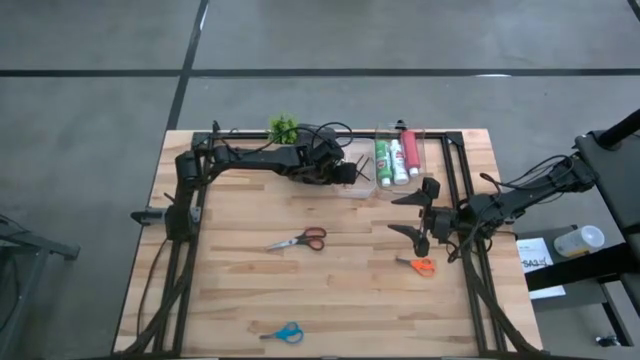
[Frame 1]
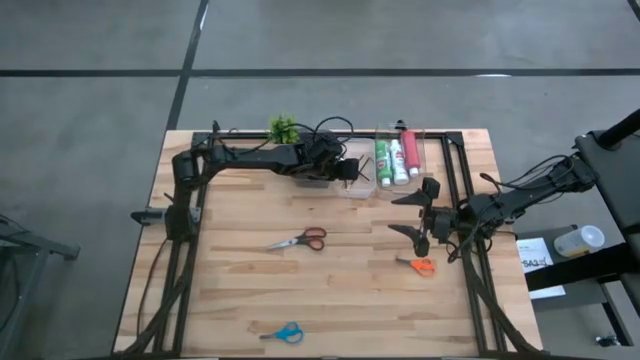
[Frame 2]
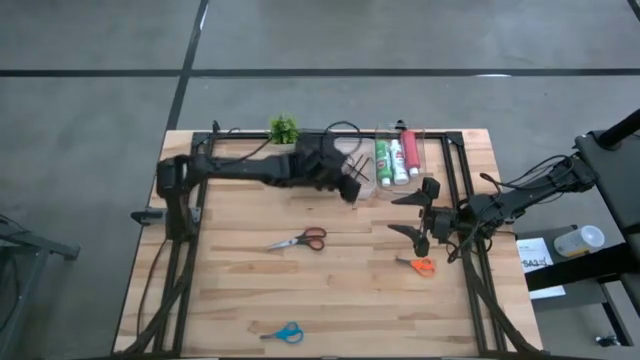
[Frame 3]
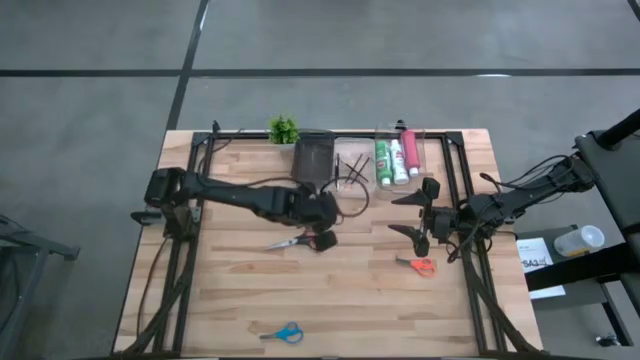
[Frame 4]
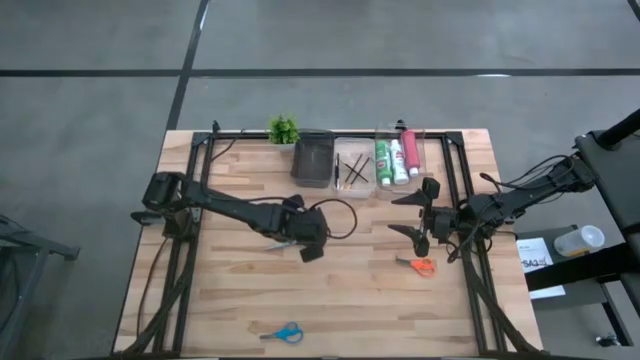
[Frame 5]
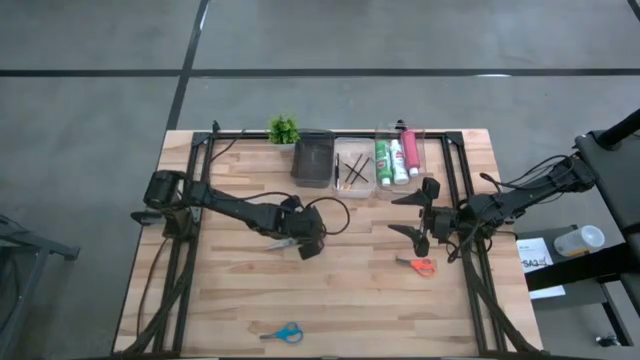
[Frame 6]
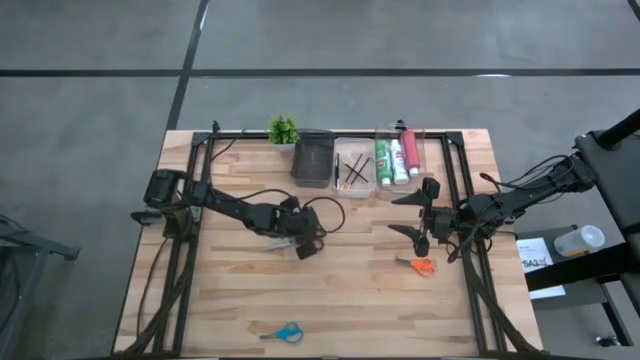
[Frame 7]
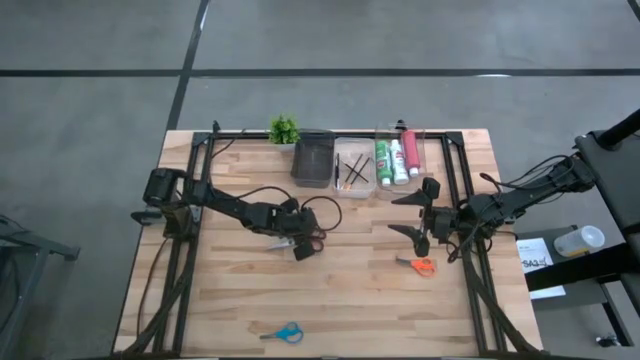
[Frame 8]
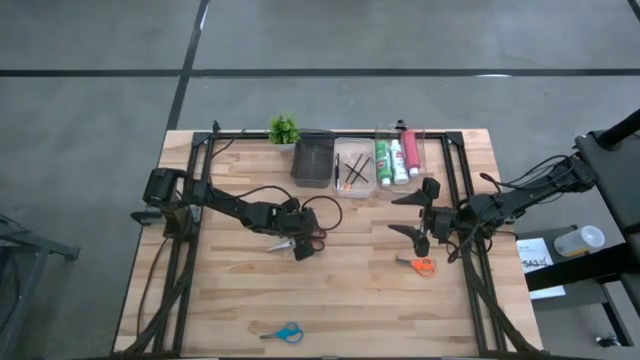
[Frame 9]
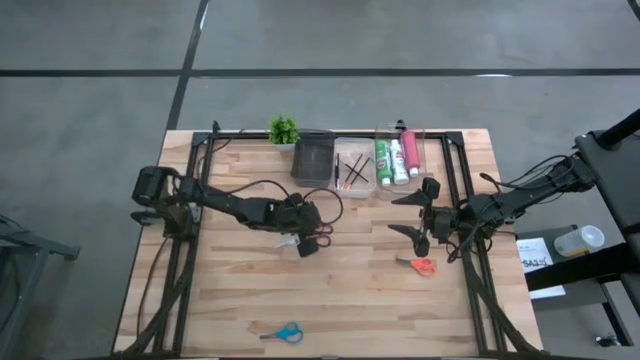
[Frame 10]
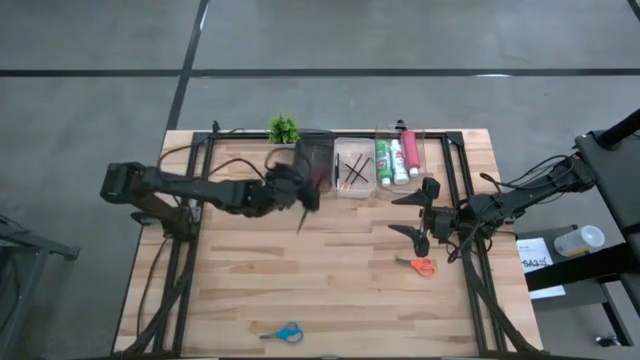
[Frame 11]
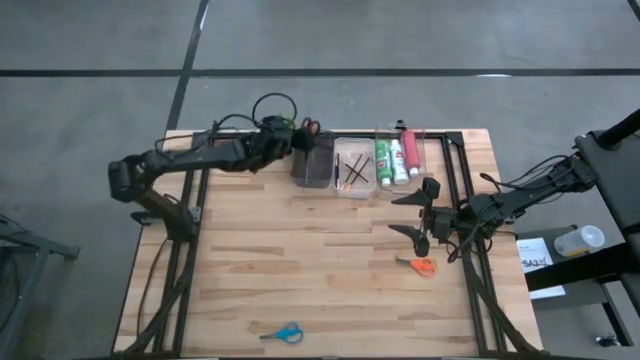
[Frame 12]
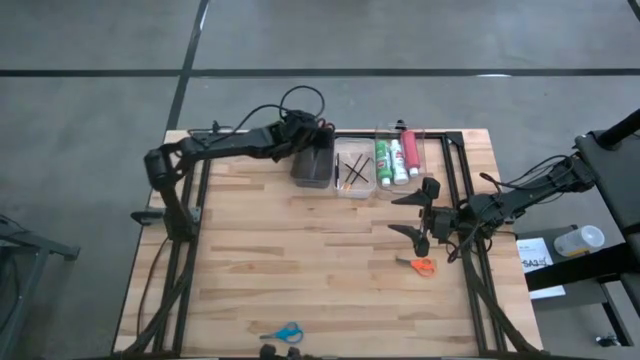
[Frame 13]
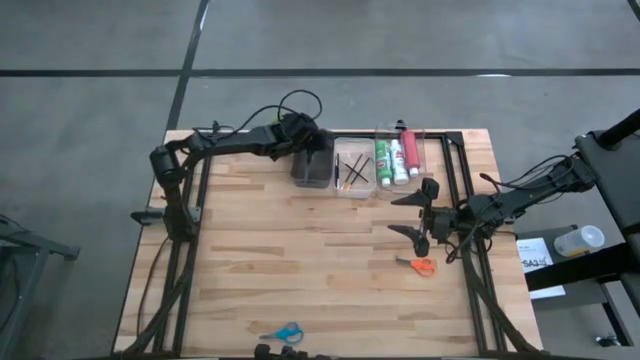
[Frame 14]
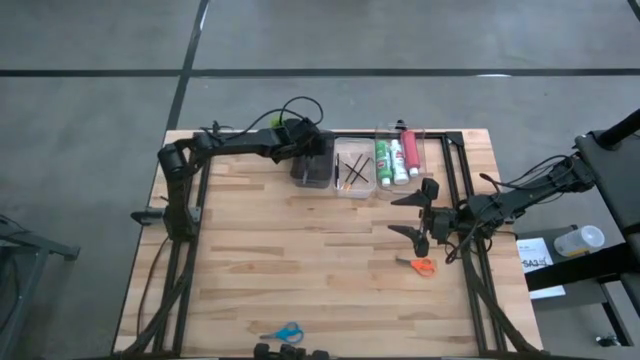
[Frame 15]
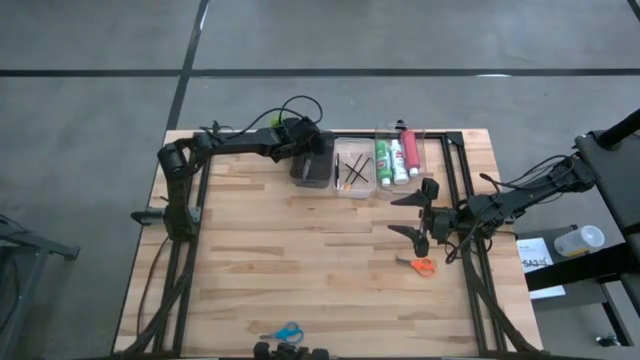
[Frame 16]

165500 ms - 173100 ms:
Task: Pick & Place Paint Supplies
Put the black scissors into the black bin

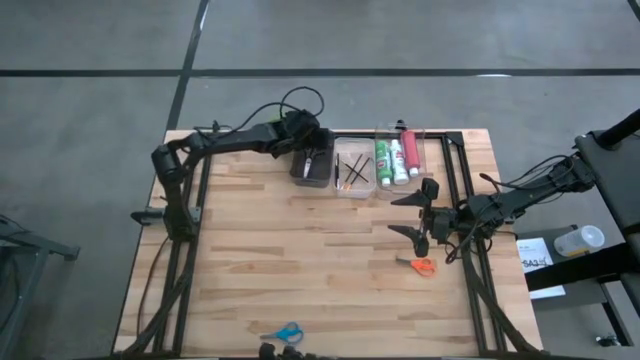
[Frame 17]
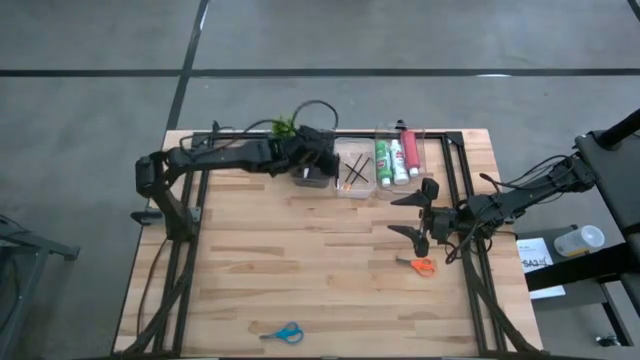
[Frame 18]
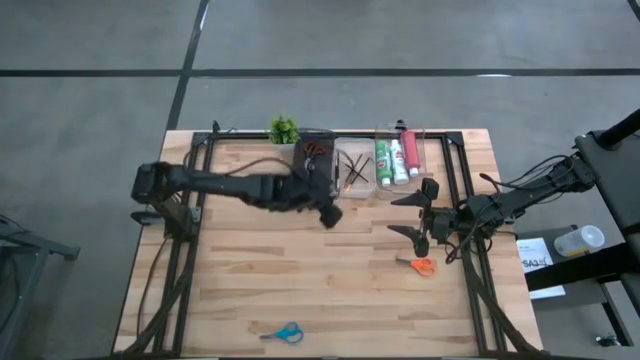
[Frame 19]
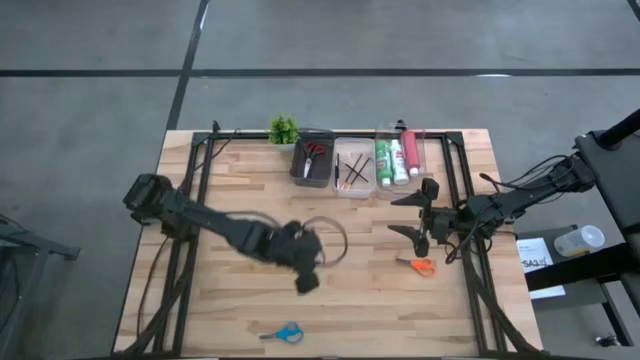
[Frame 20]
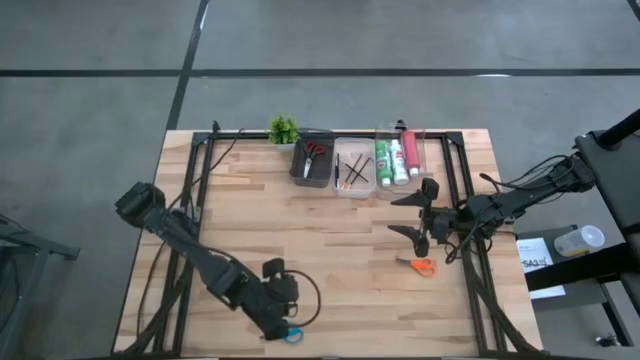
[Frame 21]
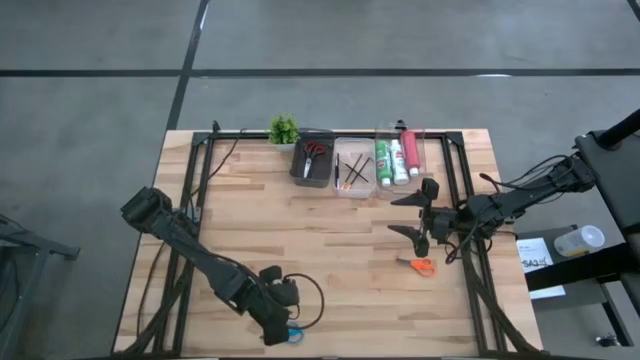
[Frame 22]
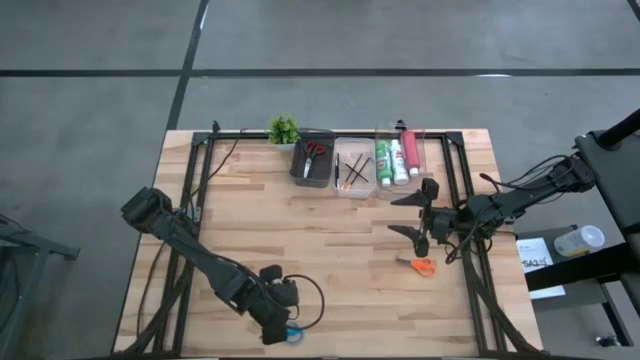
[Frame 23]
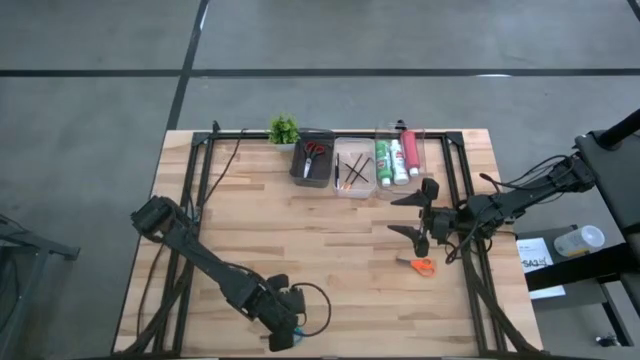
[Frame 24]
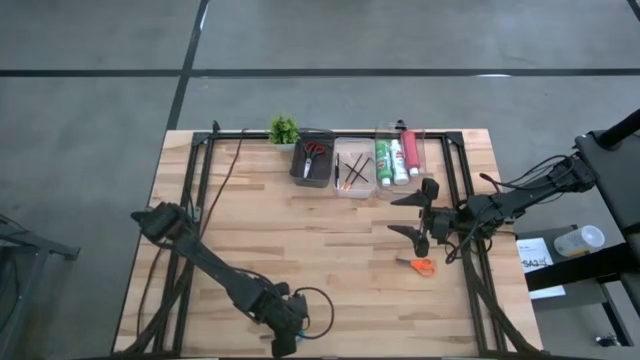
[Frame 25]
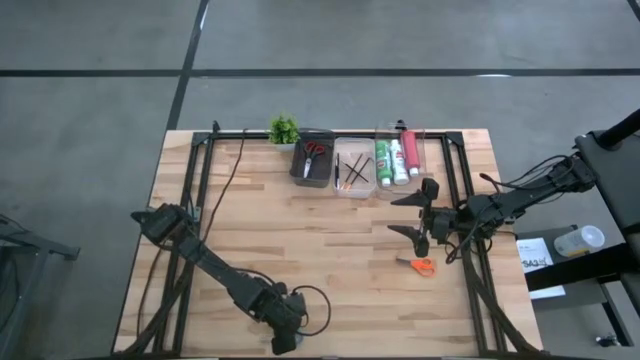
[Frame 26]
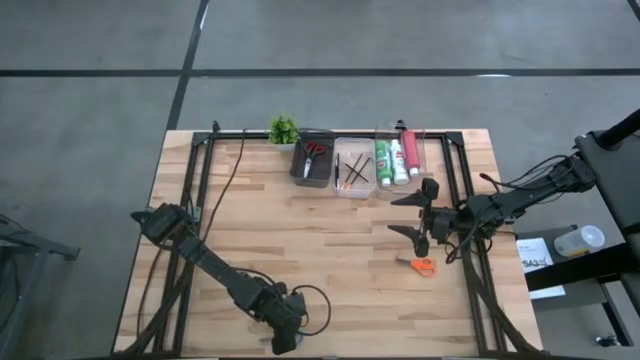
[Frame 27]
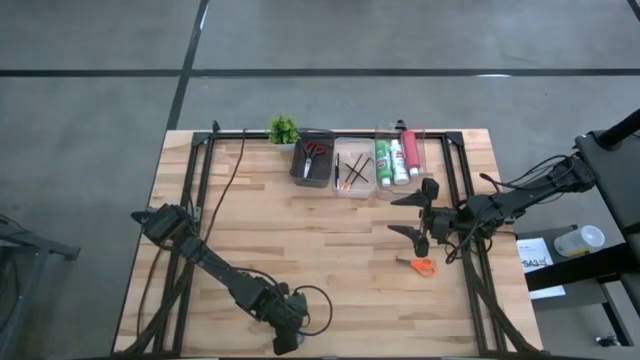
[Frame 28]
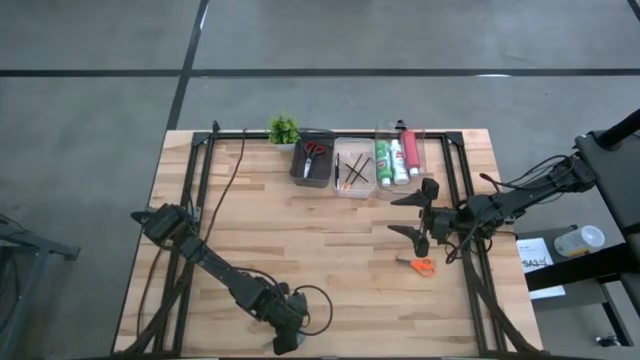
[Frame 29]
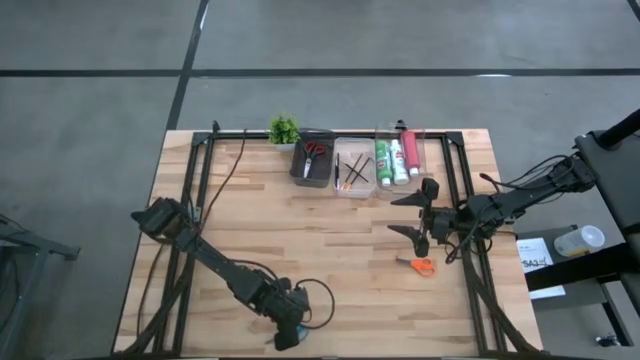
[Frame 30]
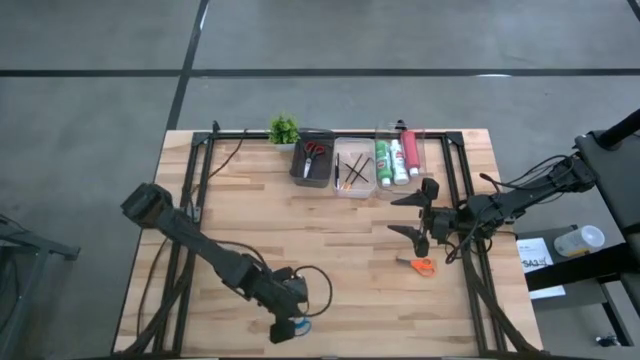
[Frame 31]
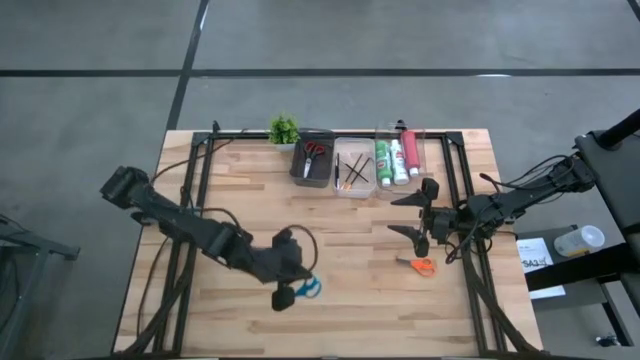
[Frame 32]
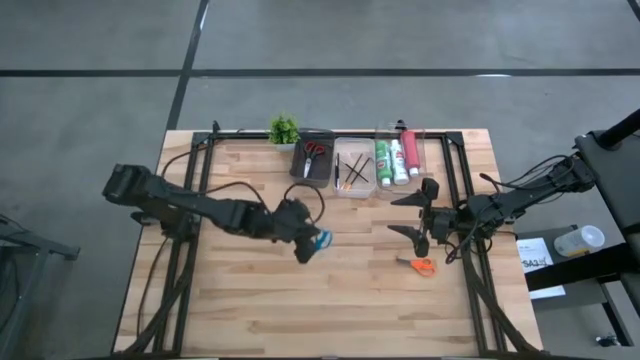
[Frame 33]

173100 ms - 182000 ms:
Put the blue scissors into the black bin

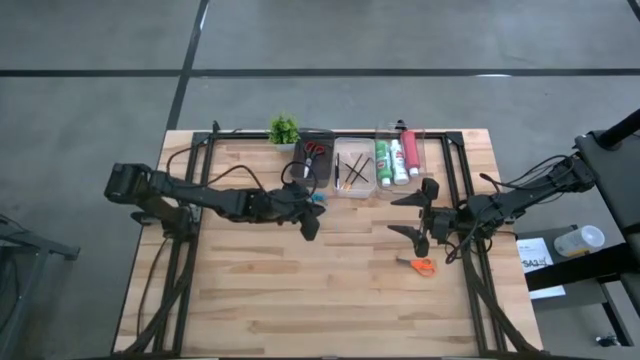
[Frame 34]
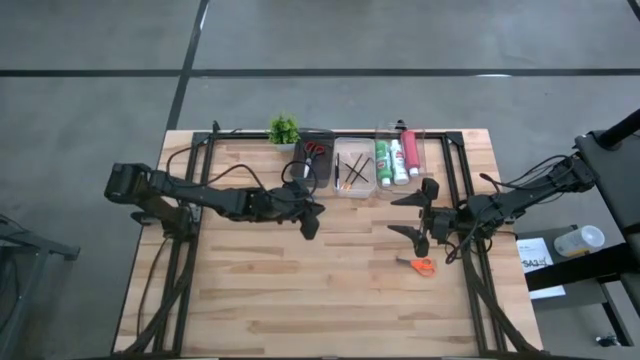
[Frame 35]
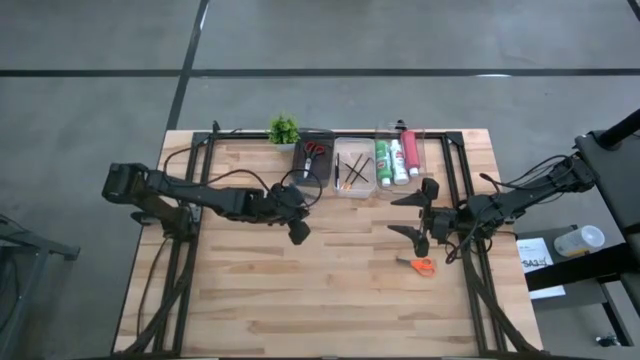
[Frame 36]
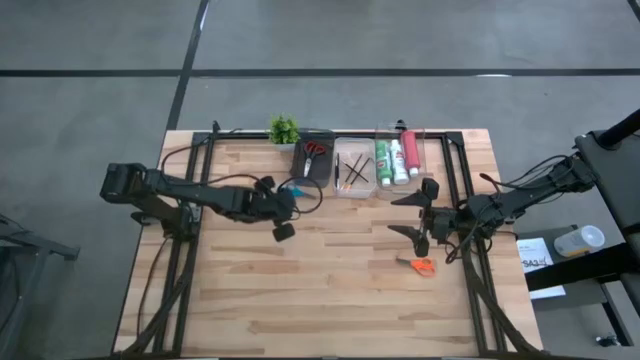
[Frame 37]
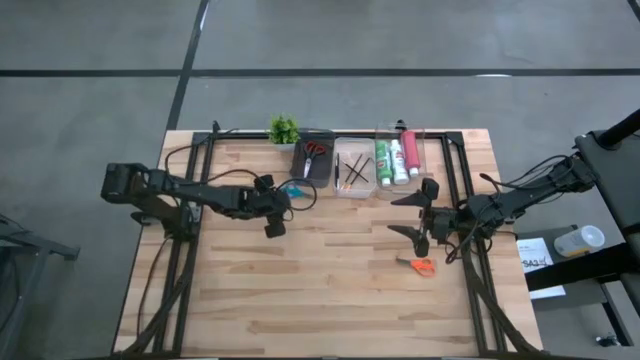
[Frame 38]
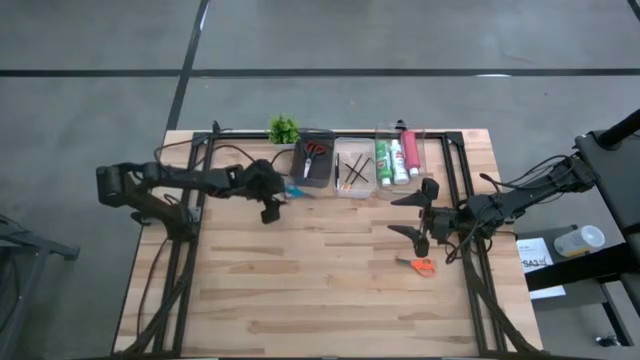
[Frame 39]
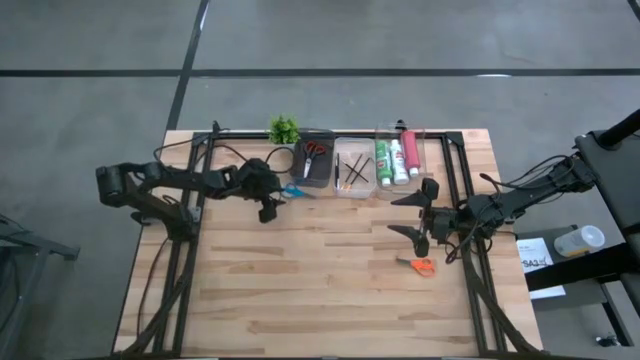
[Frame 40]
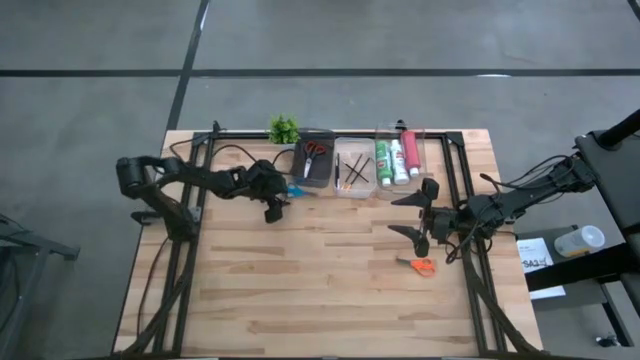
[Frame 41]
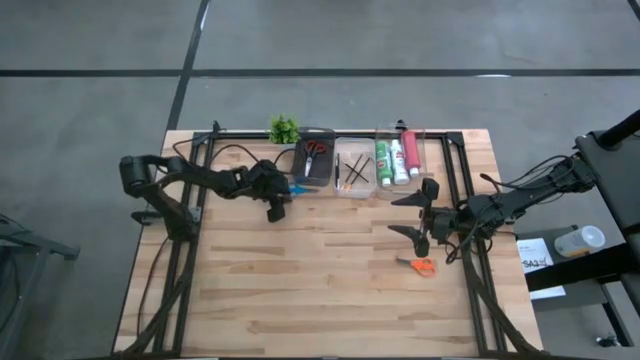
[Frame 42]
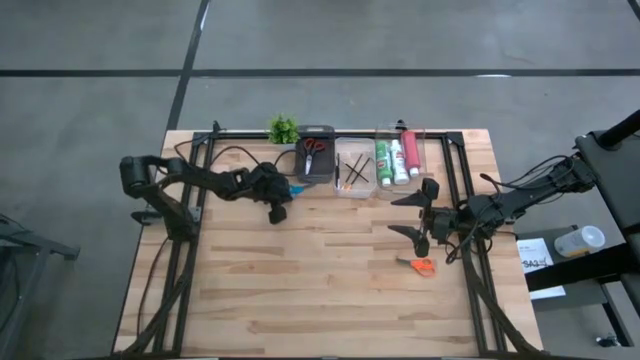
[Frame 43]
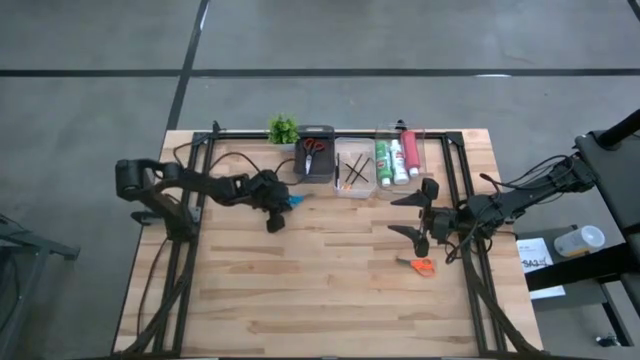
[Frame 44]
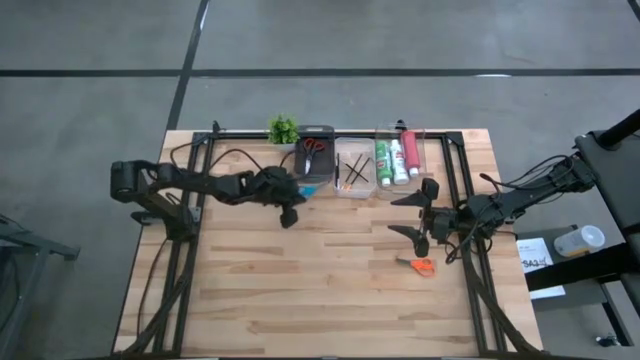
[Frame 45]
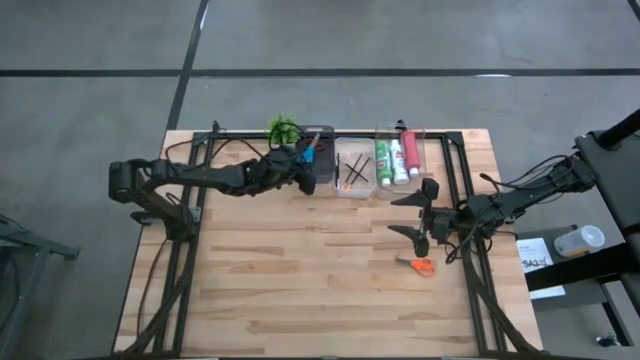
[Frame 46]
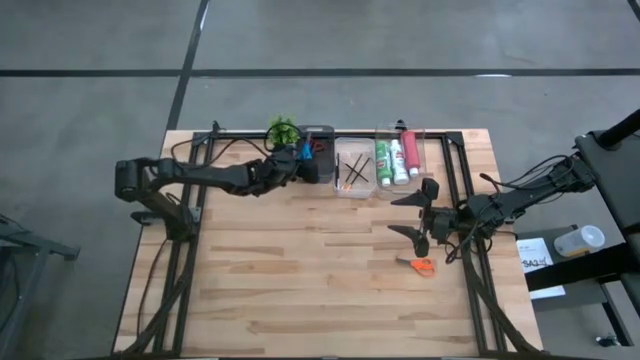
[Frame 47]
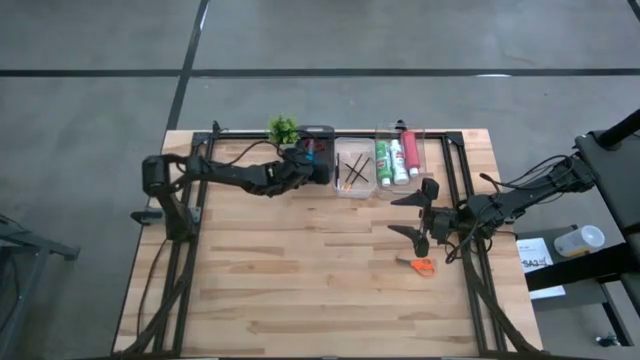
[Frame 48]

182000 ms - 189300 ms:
Put the blue scissors into the black bin
